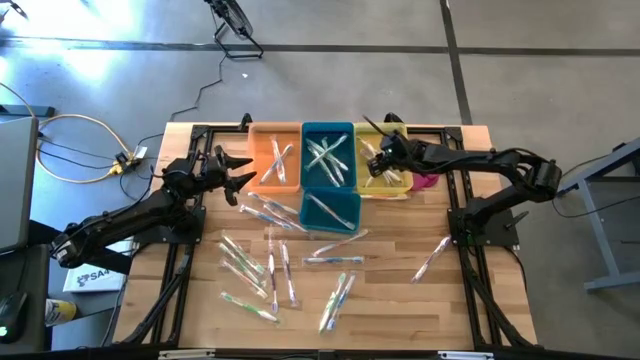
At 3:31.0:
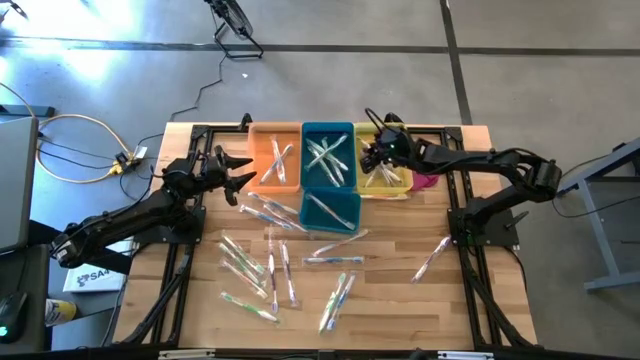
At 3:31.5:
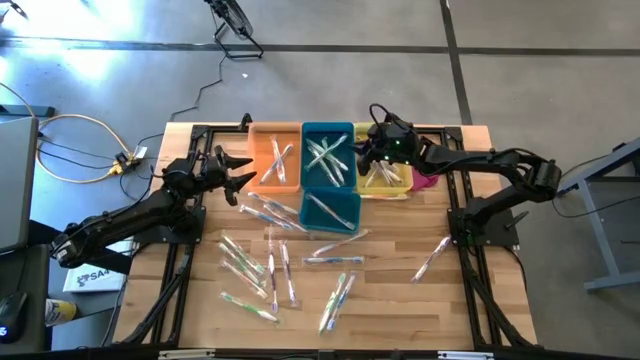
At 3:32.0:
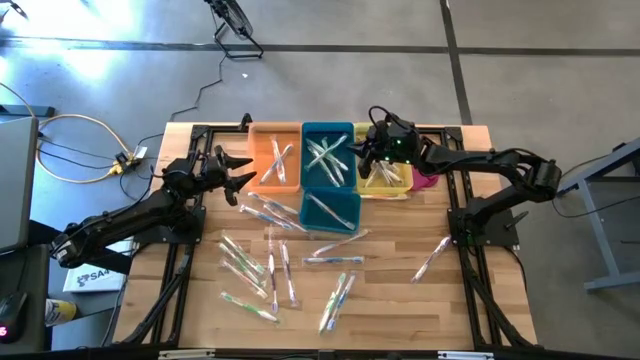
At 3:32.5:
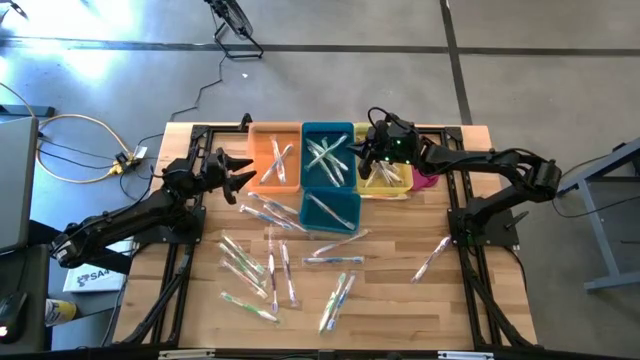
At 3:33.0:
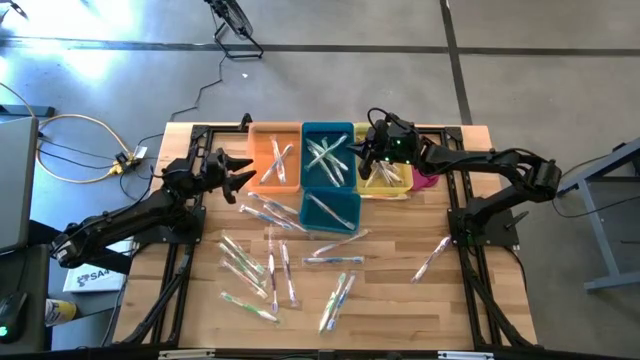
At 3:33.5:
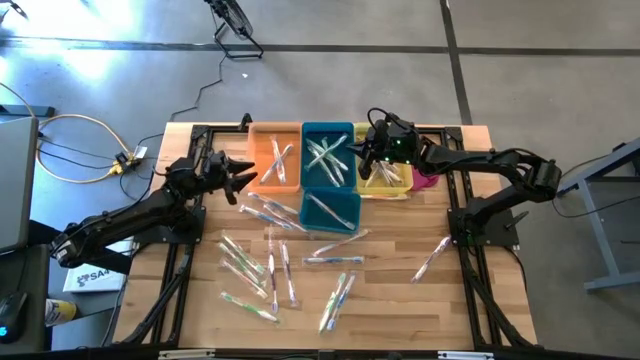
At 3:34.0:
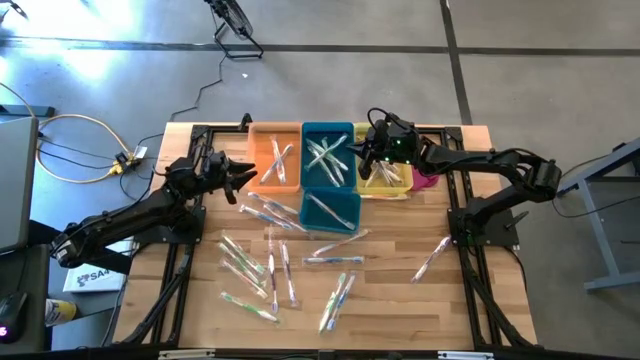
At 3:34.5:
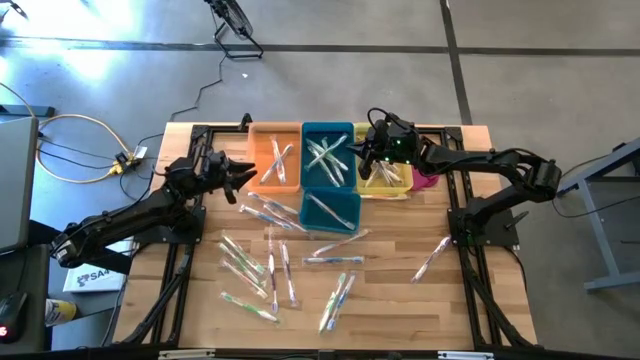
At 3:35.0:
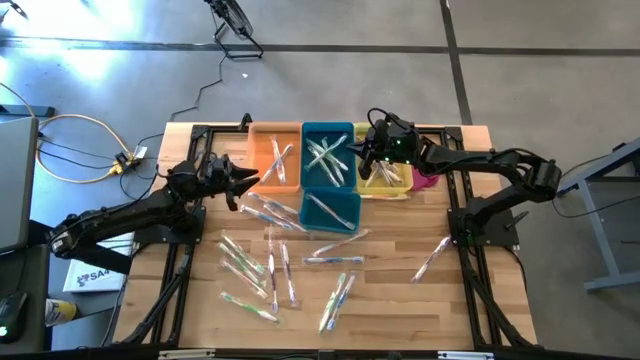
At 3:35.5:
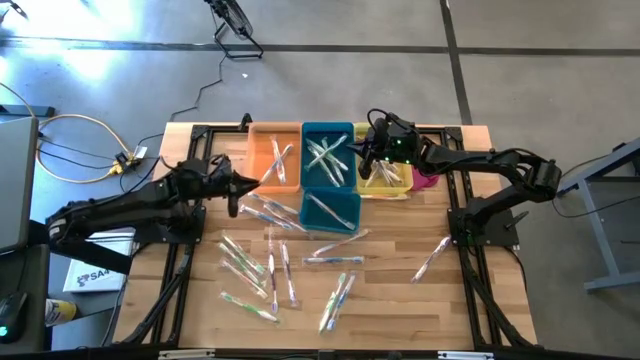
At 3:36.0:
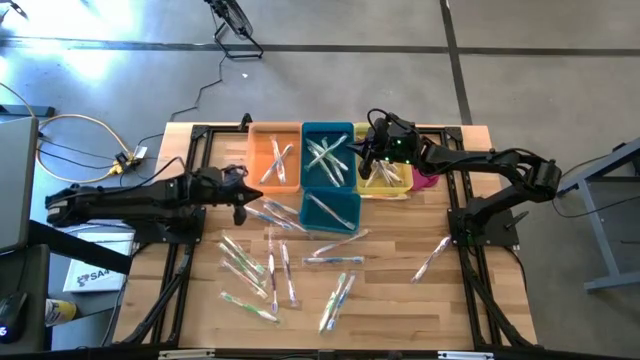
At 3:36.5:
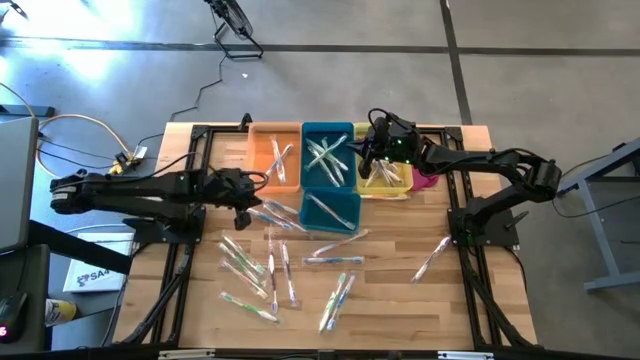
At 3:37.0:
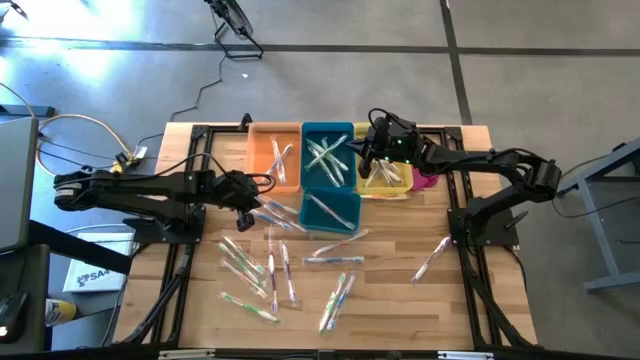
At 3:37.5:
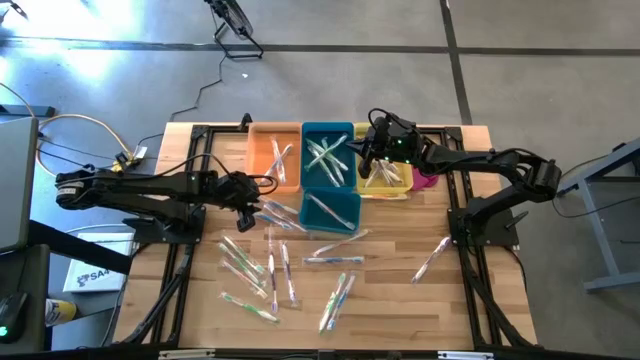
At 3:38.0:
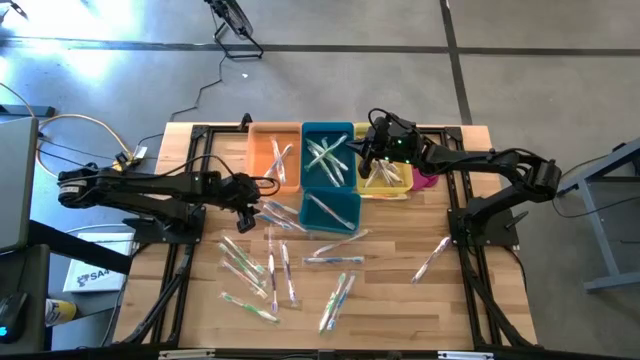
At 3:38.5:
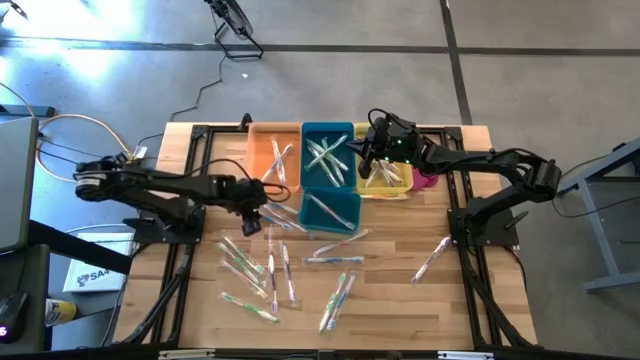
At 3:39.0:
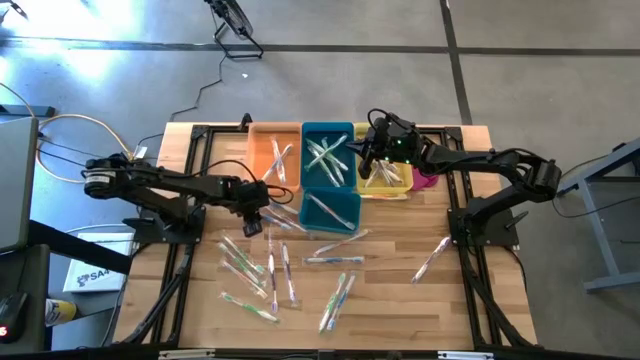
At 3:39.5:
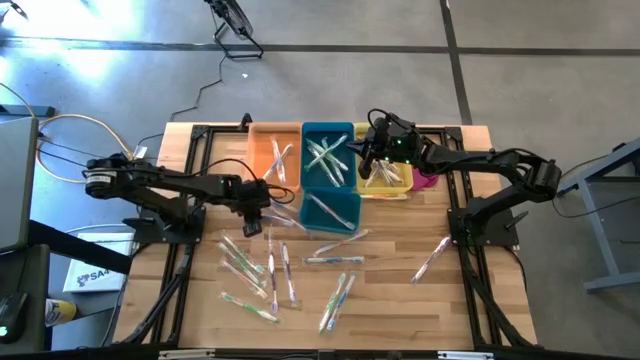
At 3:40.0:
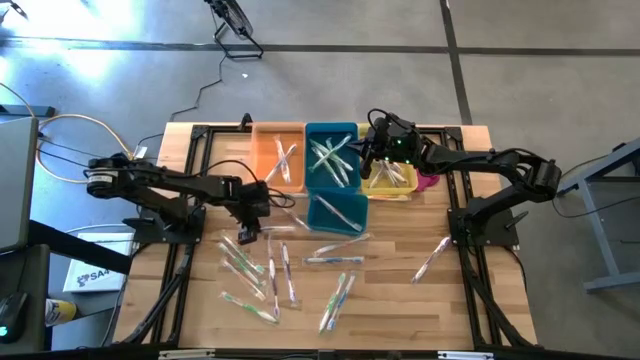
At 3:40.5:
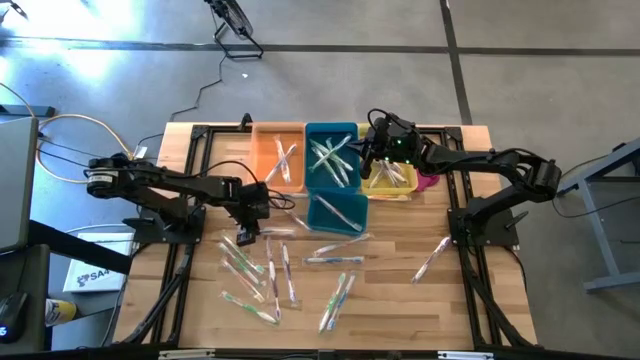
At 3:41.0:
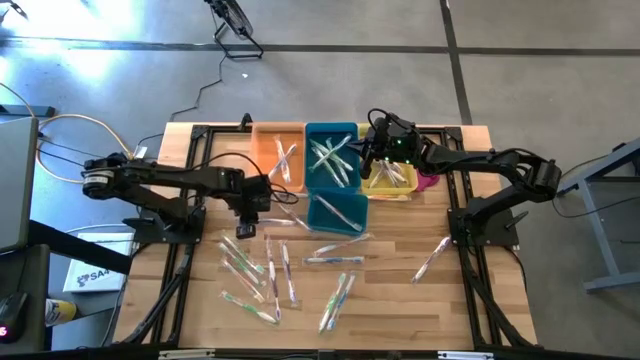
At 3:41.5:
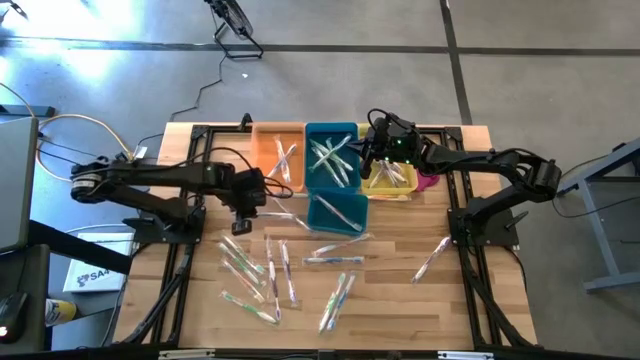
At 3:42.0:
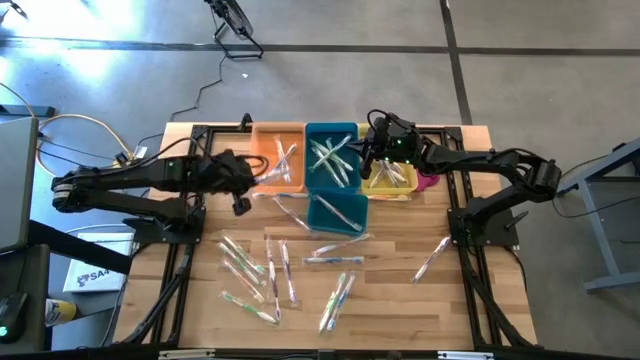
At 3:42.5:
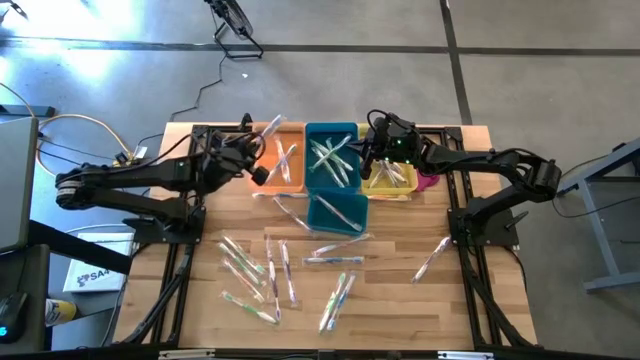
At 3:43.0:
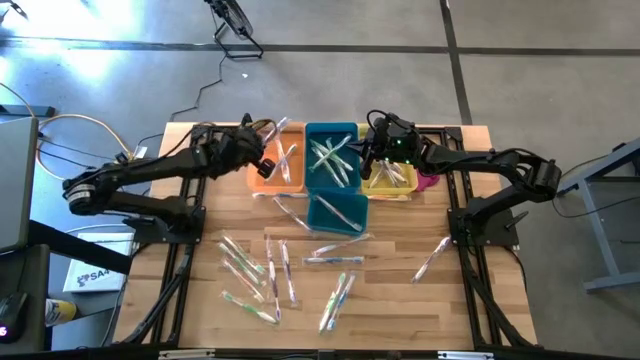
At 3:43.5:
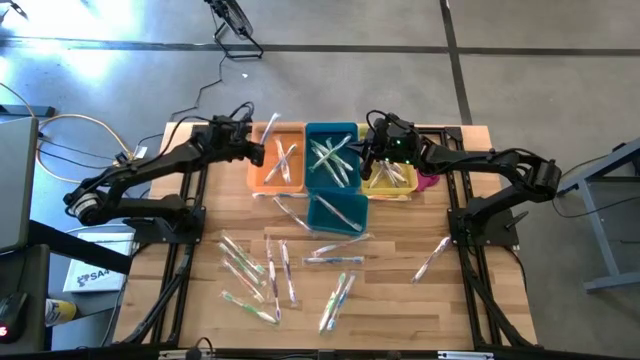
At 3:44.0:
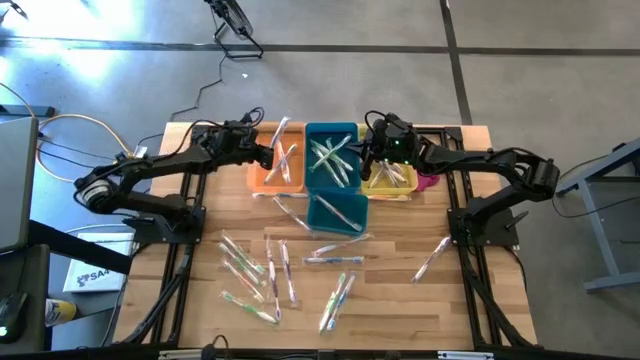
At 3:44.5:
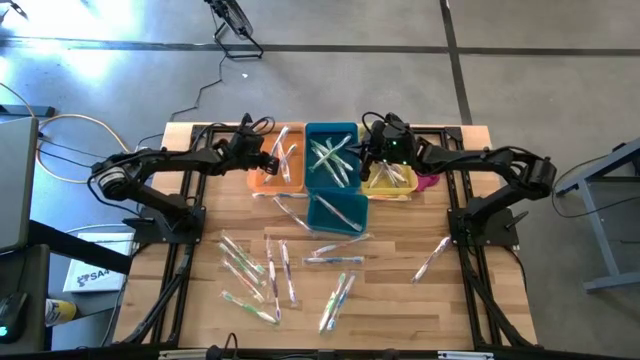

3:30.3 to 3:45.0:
Task: Pick & Place Toothbrushes
Put the blue toothbrush into the orange bin

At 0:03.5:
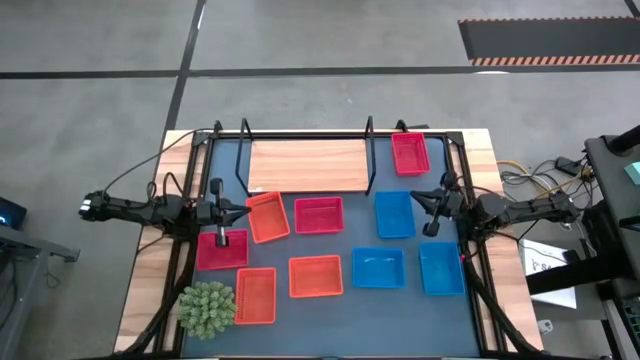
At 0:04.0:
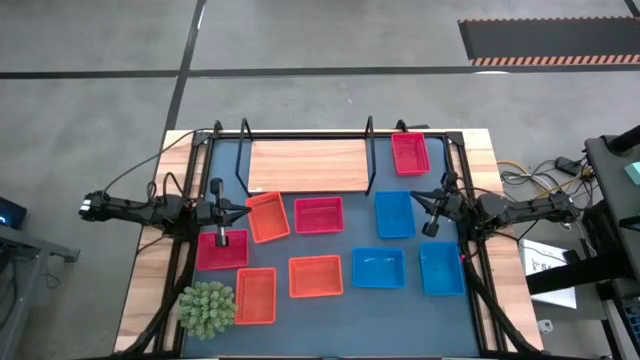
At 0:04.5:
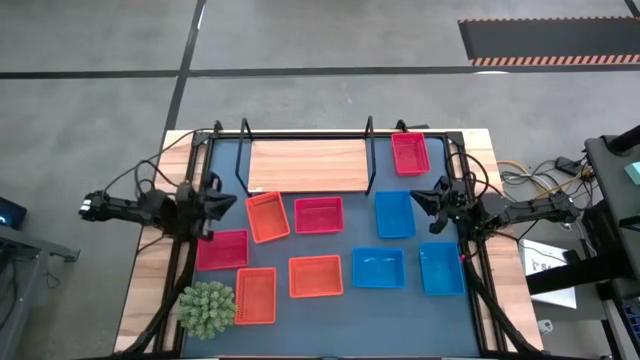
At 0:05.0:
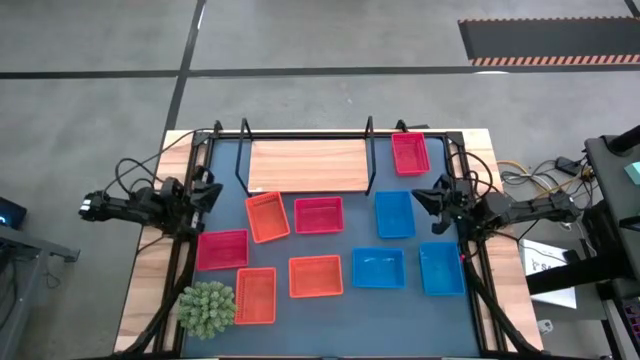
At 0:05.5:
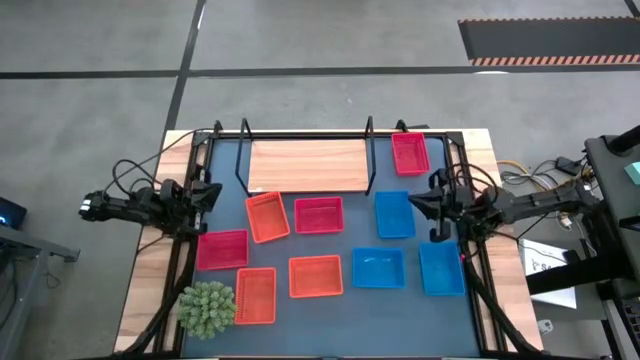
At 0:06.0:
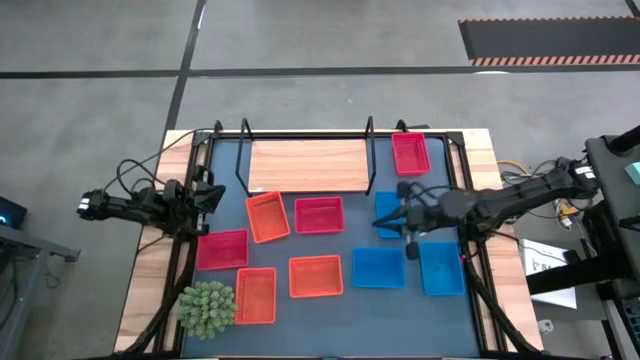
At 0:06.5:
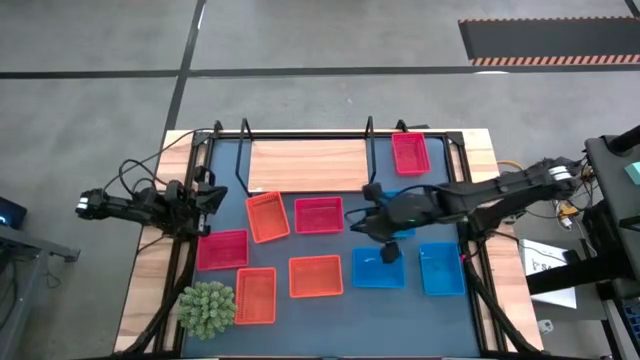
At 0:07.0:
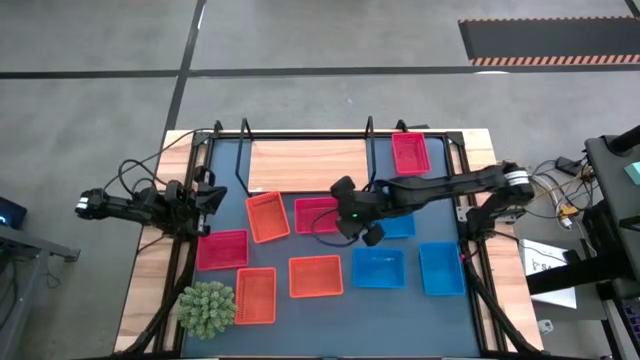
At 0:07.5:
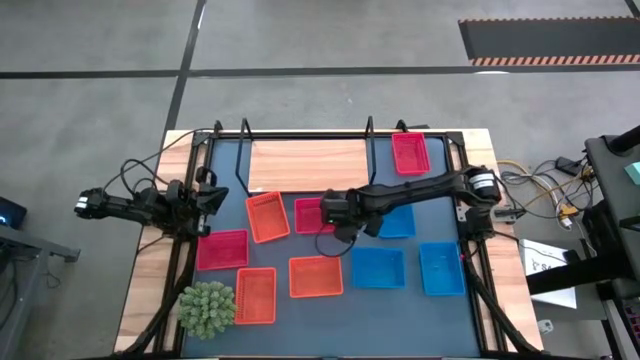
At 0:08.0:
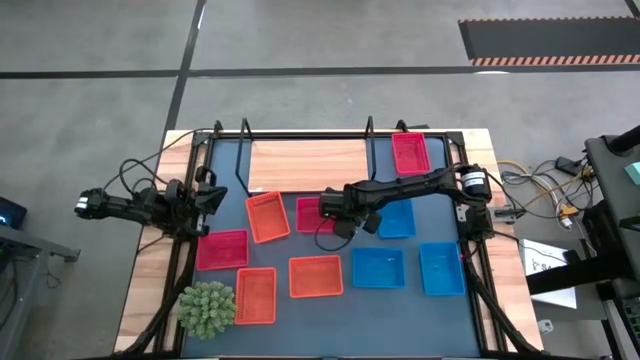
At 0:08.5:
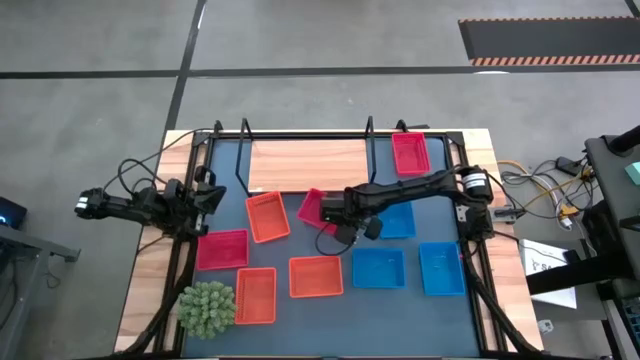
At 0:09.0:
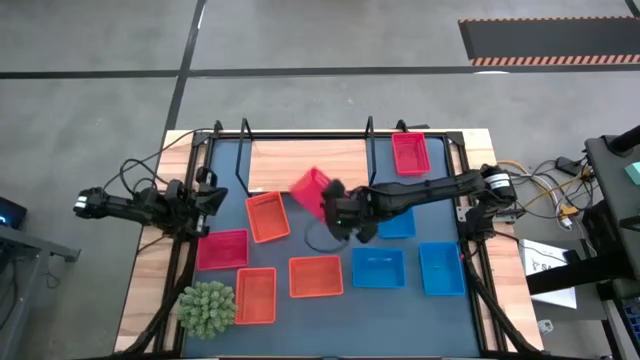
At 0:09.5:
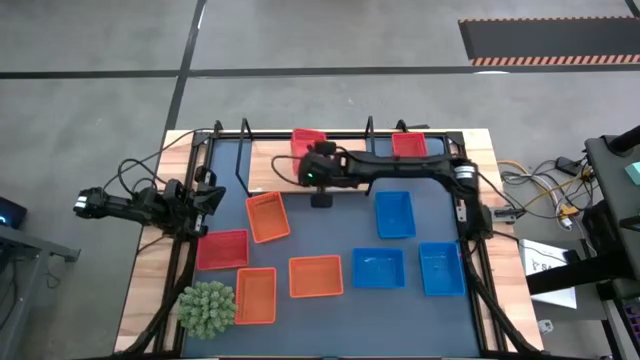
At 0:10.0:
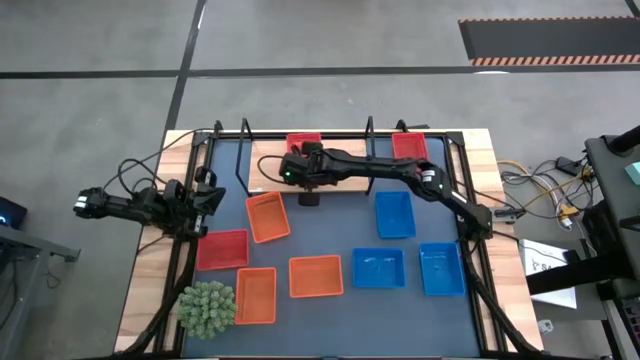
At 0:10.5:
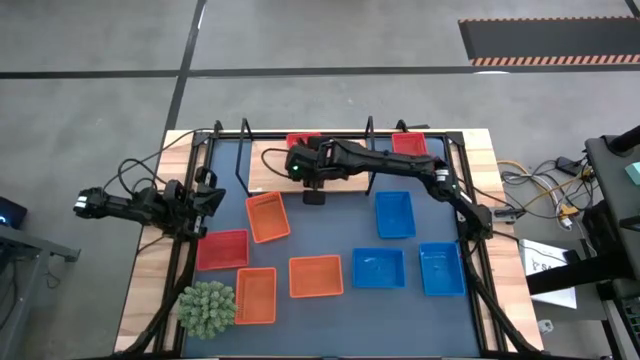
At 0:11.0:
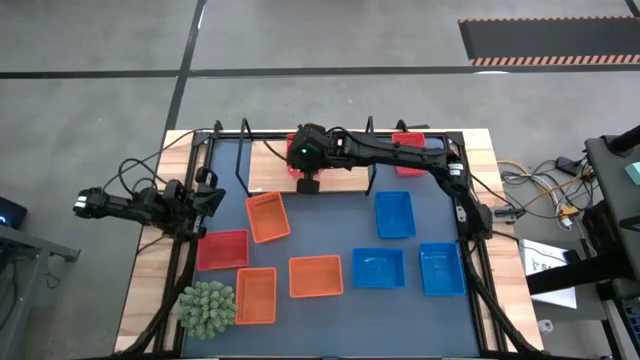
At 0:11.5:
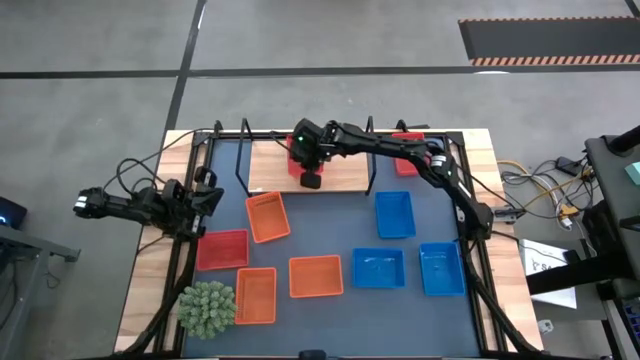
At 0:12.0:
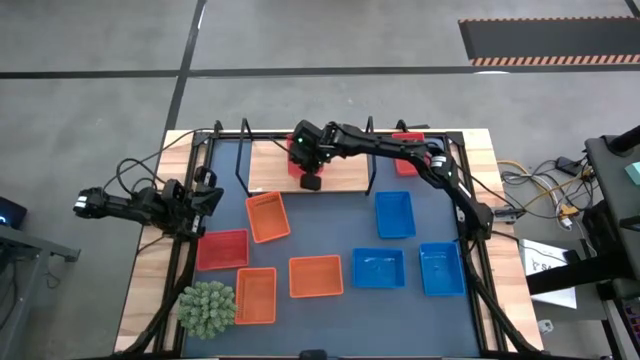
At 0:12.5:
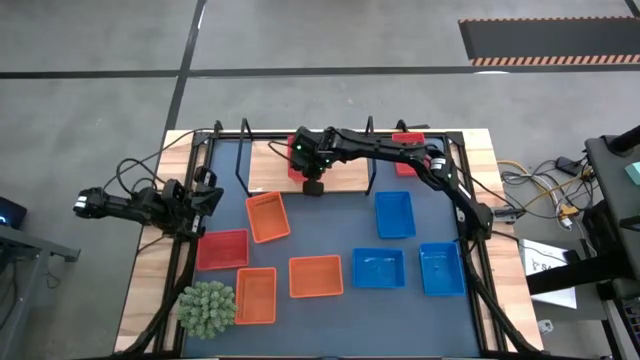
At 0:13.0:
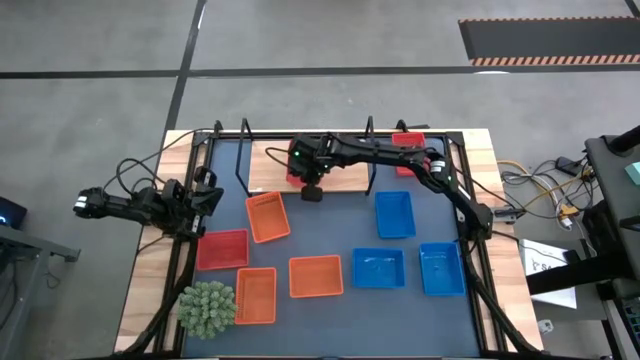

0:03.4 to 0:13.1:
Task: Stack baskets on shelf by color
Put the middle red basket on the shelf
